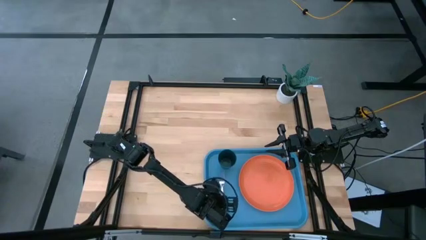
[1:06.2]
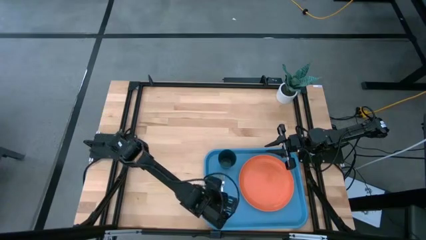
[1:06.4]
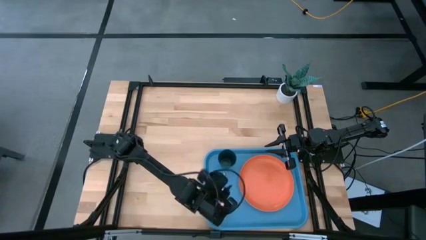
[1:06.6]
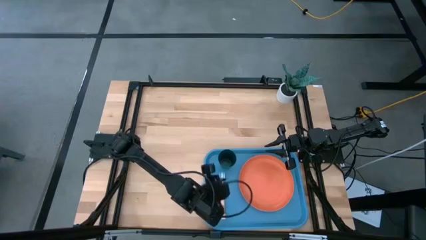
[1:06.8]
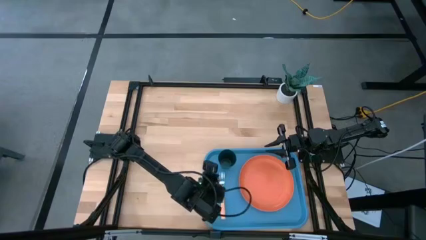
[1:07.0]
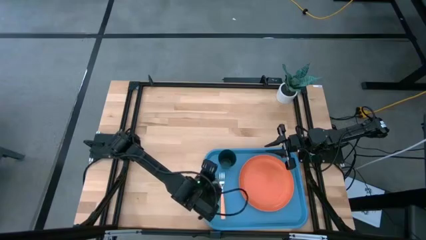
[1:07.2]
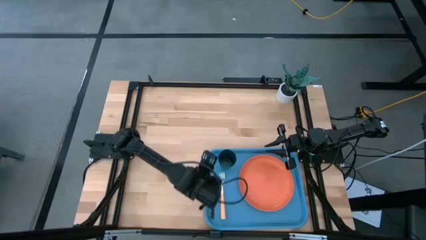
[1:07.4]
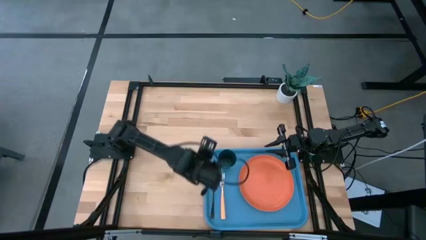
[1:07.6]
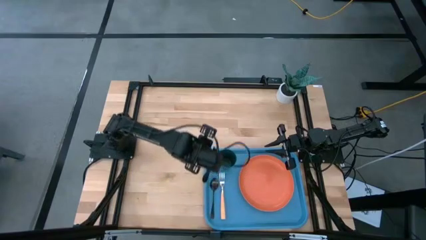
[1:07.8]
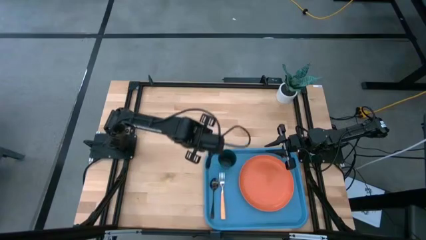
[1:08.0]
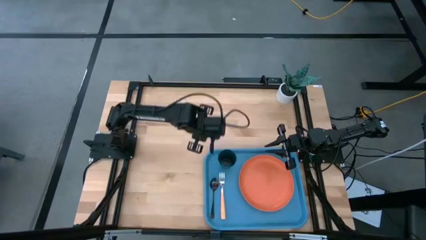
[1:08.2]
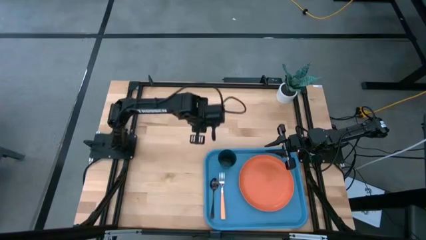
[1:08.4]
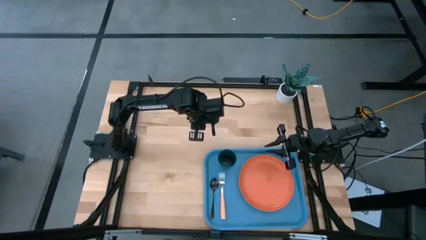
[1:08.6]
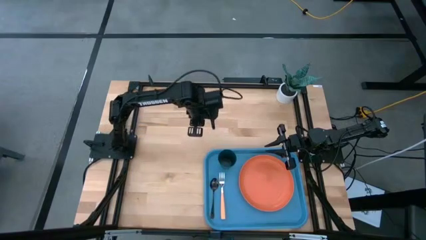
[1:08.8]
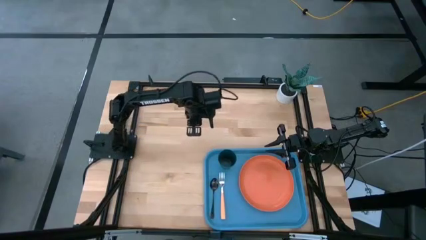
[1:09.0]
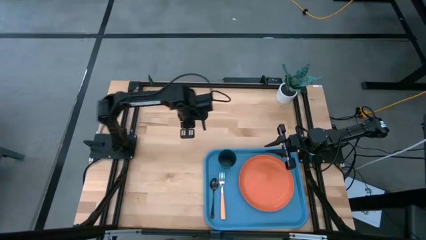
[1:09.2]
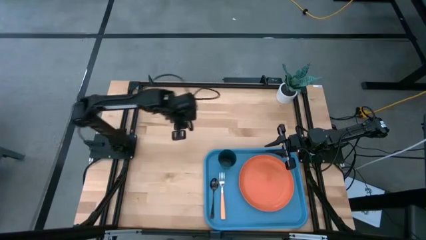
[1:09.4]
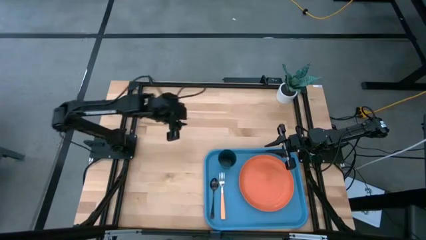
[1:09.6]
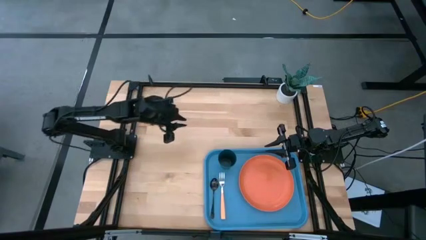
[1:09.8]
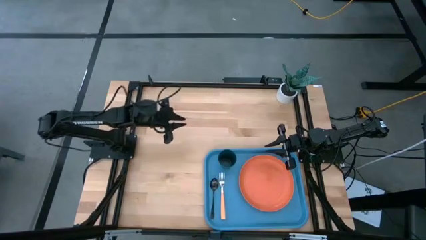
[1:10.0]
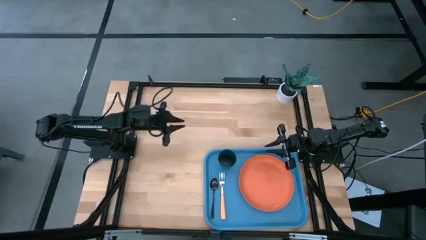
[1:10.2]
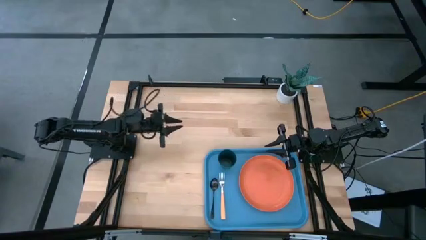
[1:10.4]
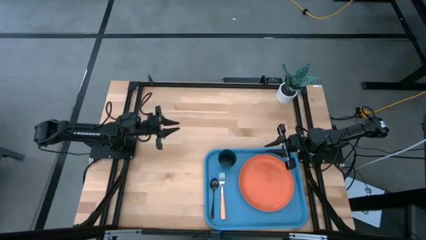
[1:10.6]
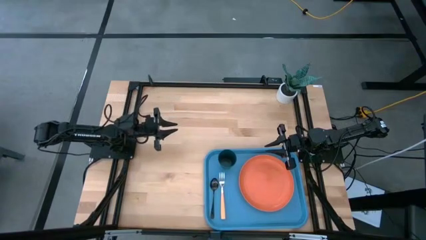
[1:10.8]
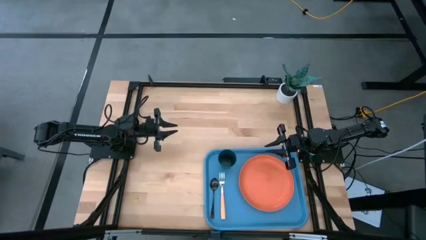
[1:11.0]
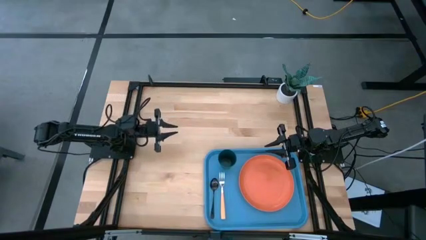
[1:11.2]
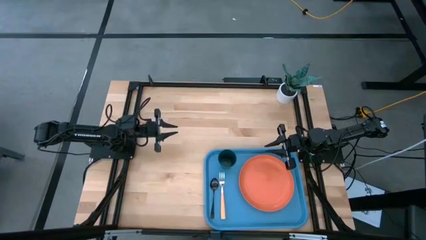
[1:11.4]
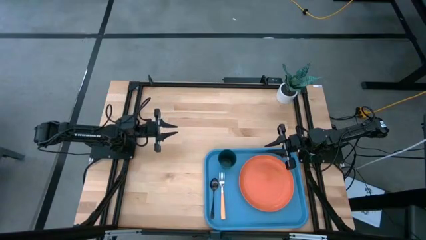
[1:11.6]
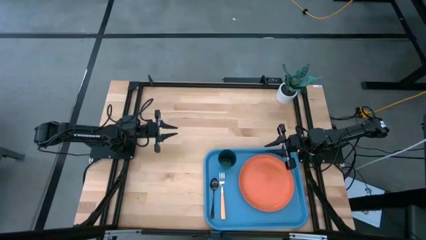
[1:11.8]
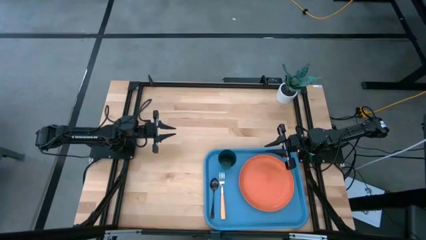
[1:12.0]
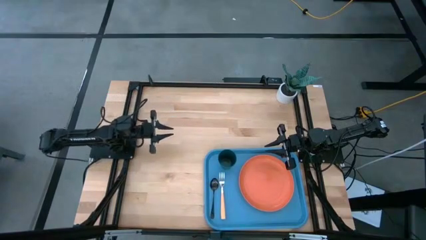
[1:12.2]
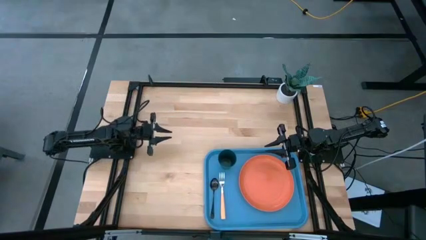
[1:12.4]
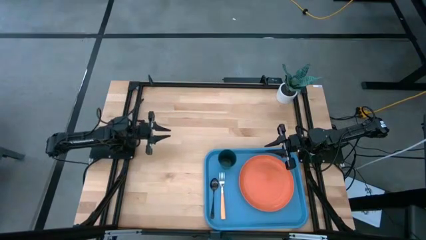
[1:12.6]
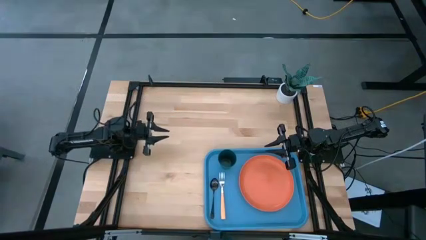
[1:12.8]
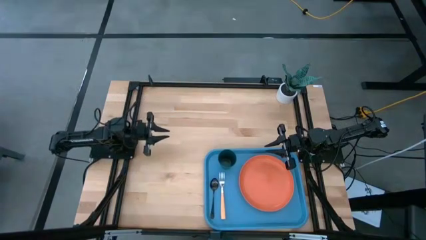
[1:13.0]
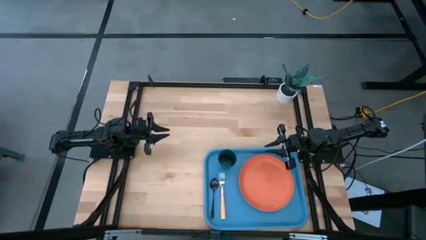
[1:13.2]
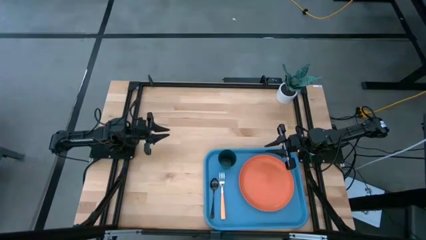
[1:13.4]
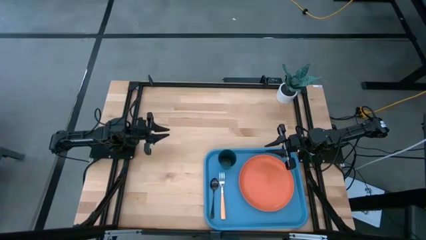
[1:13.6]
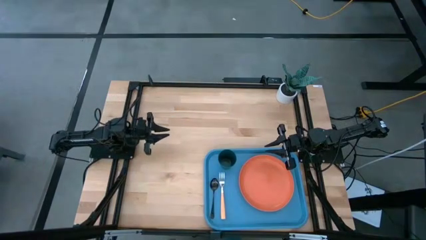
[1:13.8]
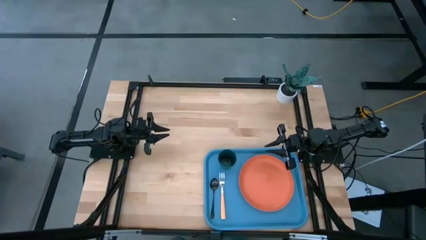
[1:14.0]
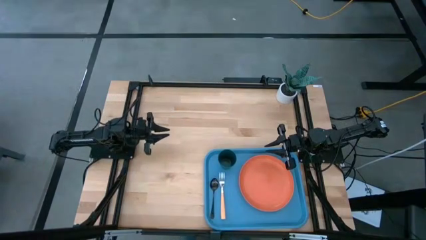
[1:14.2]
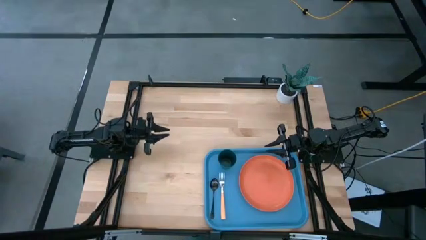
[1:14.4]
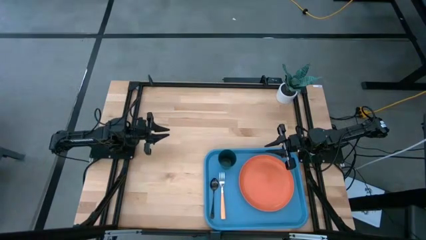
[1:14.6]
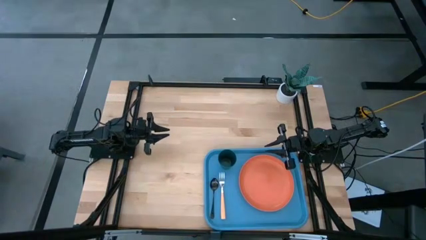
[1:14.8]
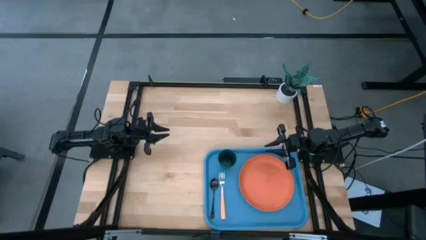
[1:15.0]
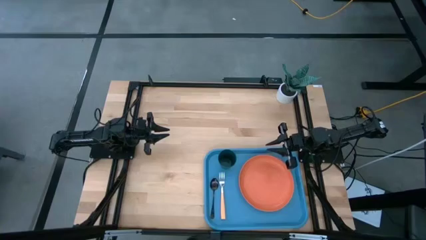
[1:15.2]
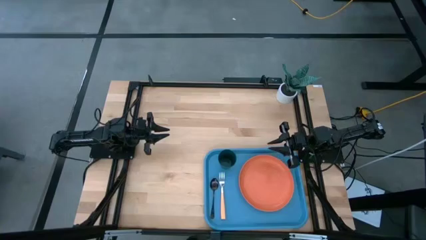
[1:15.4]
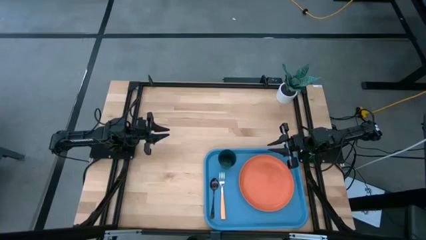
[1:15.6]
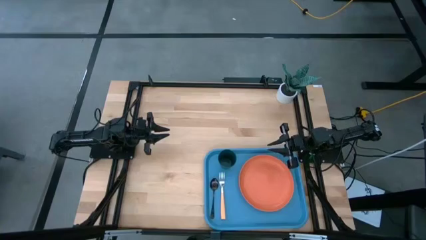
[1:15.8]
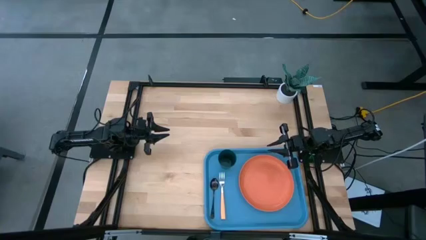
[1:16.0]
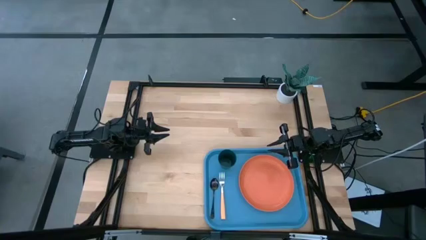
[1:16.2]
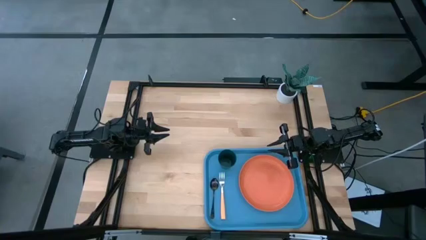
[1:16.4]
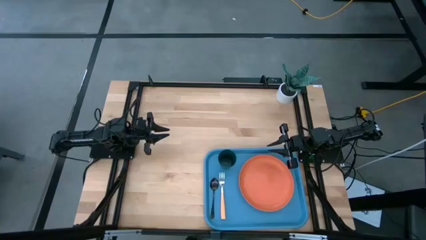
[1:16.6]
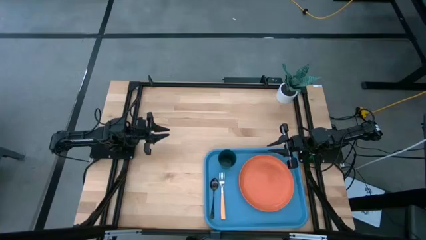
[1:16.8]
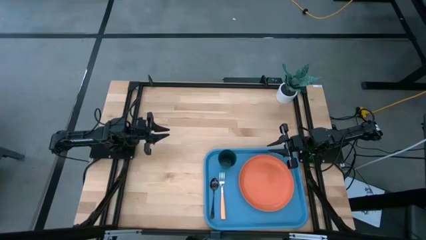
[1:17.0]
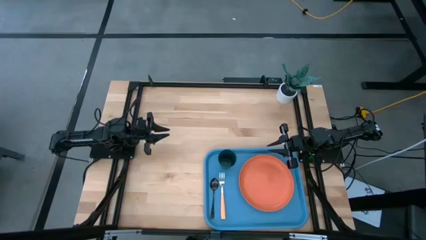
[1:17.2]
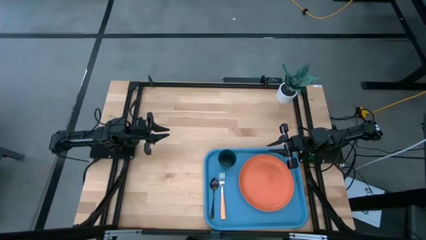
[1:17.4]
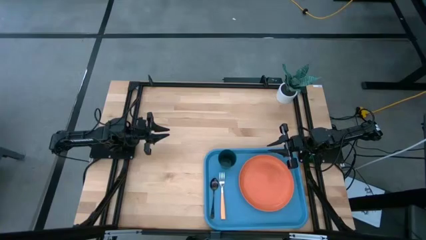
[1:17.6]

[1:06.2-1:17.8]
Task: Pick and place plate/cup/fork/spoon on tray
Return to Home Position

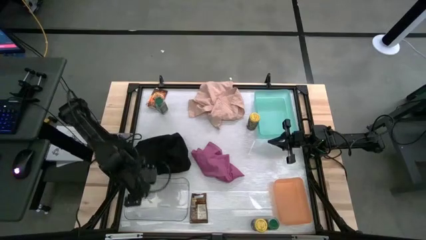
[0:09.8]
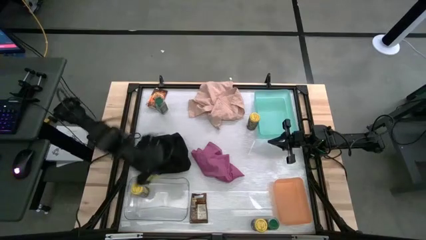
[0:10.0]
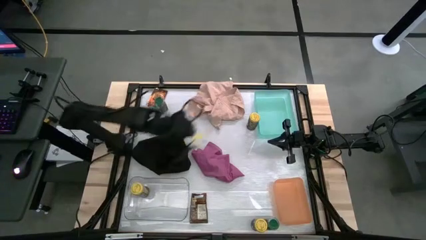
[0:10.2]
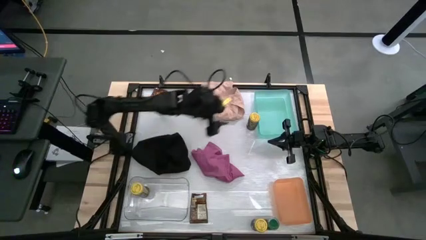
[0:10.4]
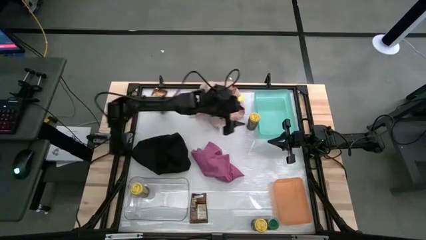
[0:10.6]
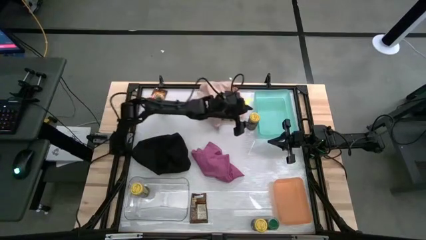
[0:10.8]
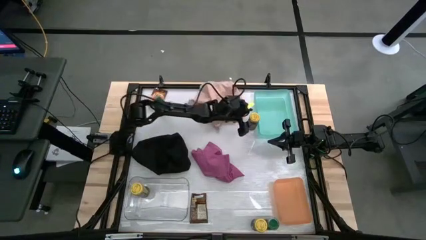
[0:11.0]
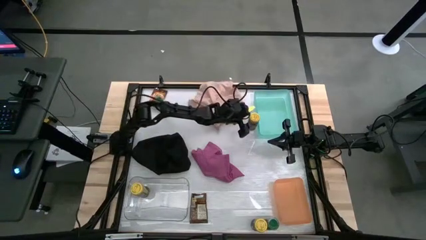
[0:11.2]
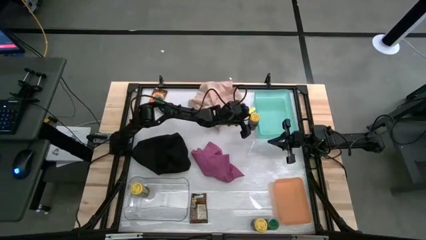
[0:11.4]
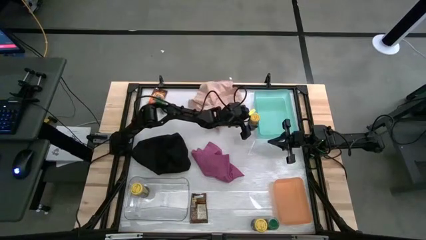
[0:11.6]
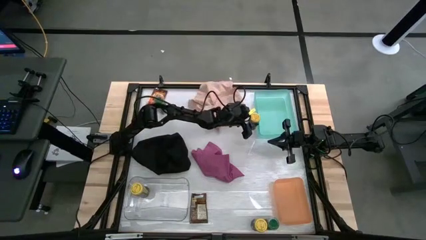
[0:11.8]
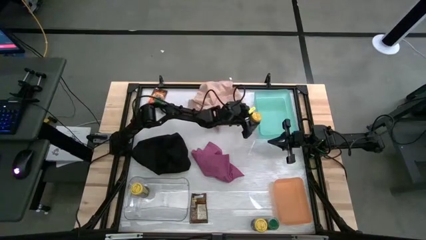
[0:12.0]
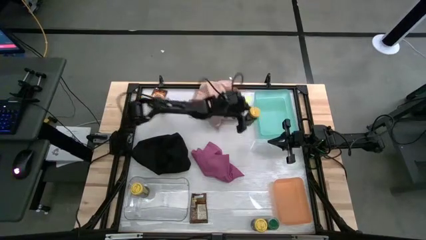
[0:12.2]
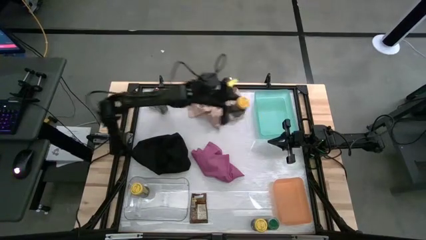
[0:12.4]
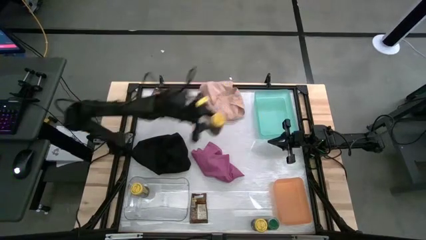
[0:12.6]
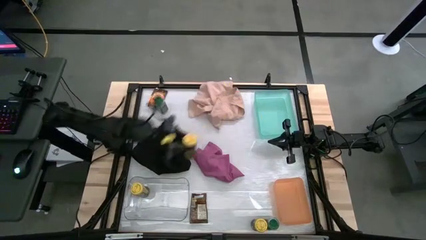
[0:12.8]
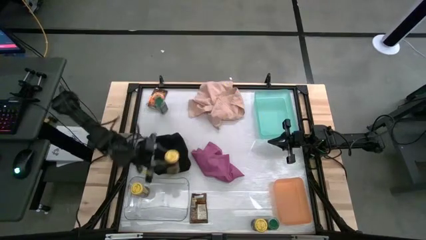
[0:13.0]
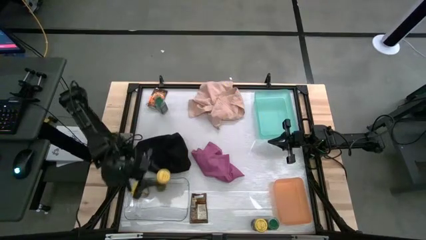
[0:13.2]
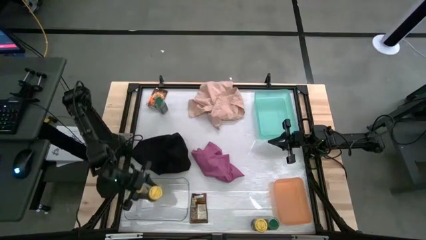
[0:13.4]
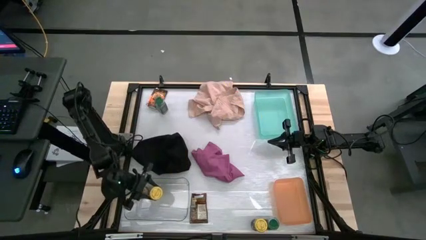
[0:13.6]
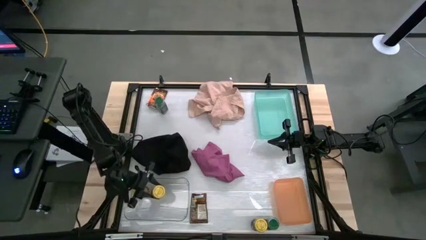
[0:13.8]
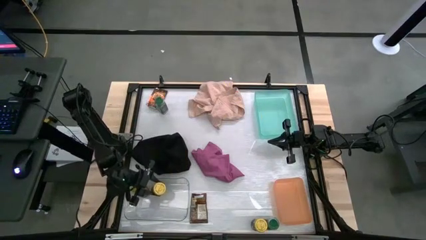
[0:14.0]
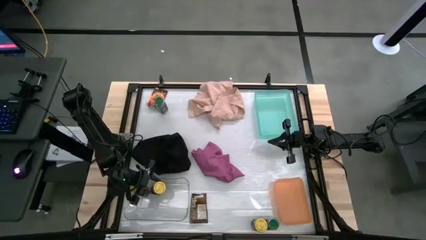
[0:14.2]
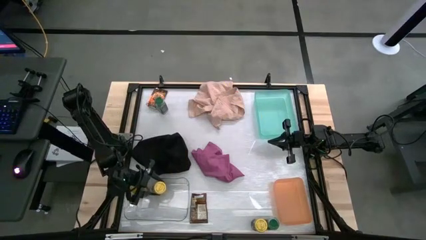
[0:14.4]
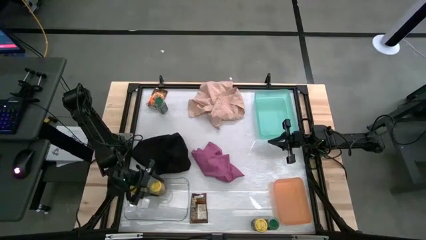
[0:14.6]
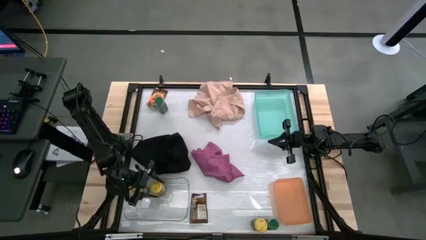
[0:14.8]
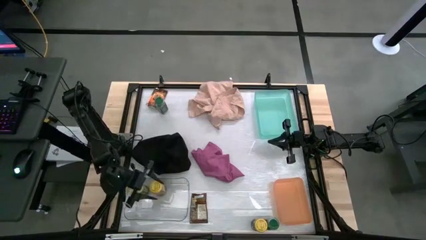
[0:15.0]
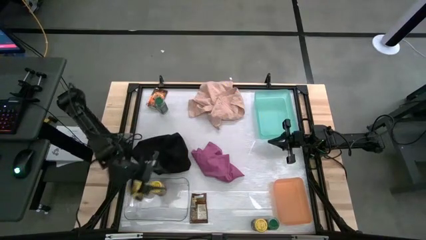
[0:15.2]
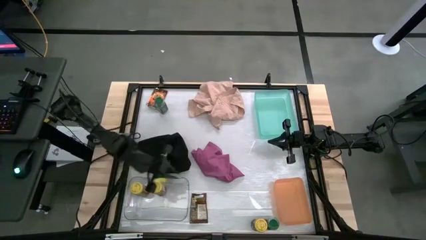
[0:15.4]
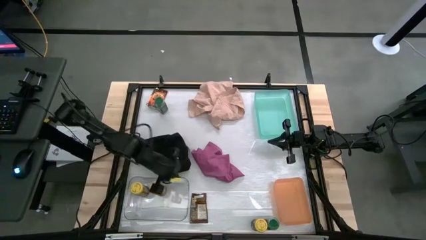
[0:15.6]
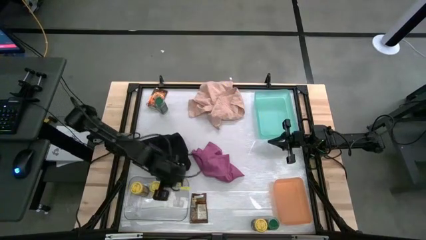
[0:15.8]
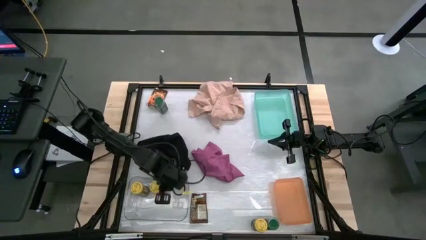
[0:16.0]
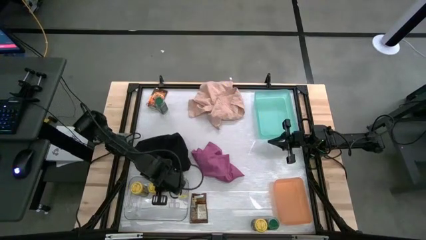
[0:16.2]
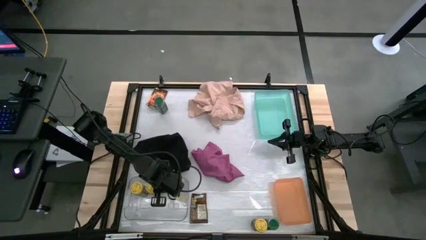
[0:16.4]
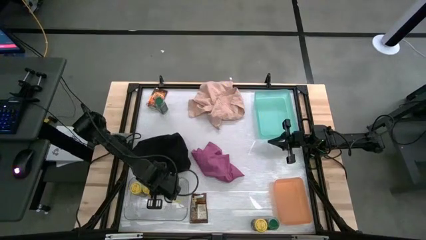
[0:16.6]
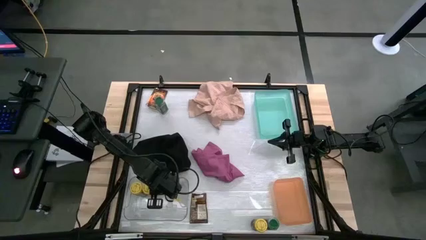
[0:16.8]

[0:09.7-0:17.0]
Task: Sort spices by type
Put the top yellow seasoning bottle into the transparent bin
